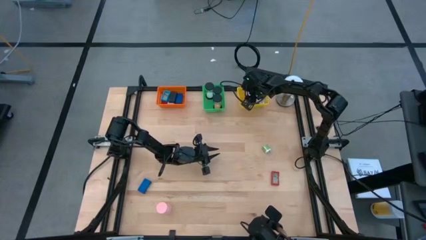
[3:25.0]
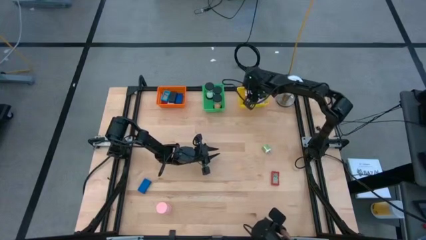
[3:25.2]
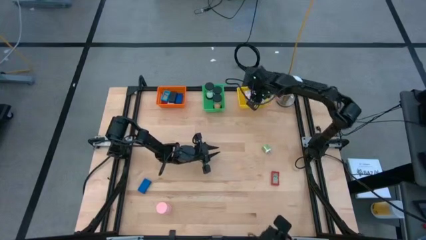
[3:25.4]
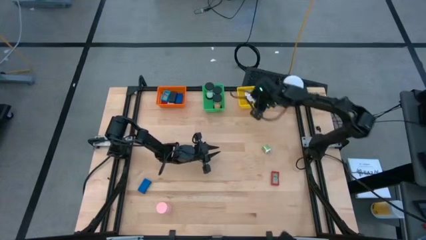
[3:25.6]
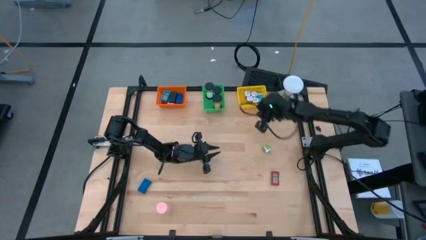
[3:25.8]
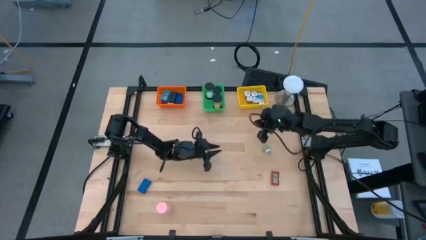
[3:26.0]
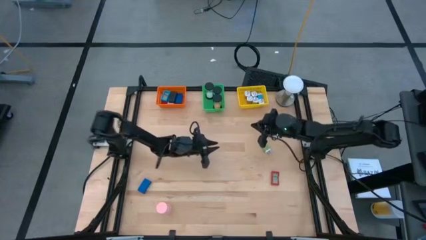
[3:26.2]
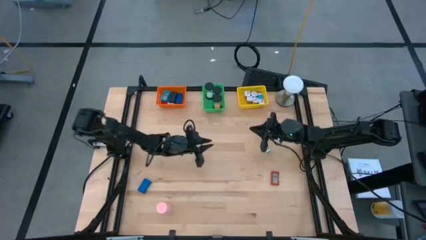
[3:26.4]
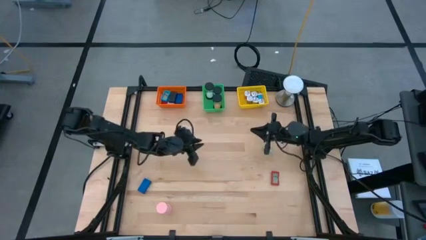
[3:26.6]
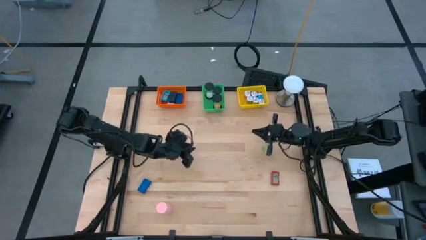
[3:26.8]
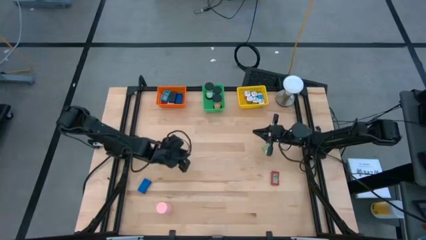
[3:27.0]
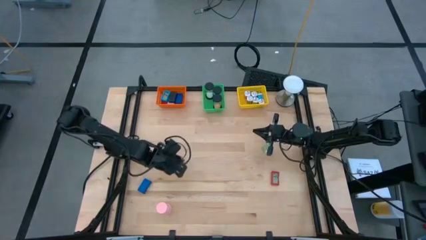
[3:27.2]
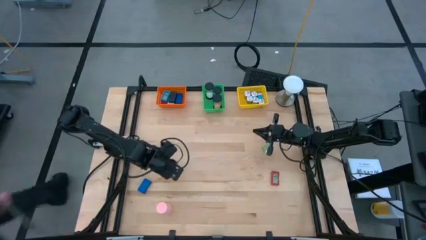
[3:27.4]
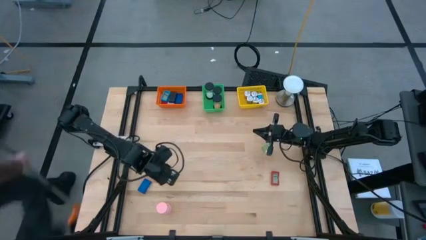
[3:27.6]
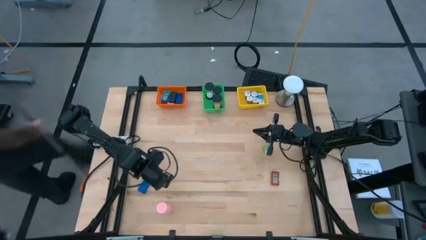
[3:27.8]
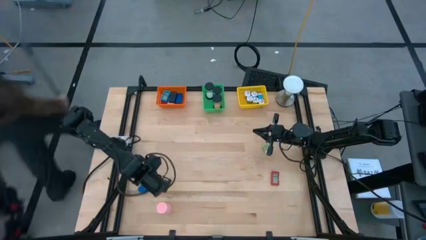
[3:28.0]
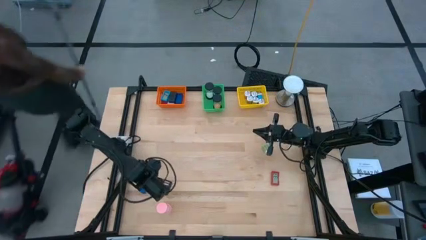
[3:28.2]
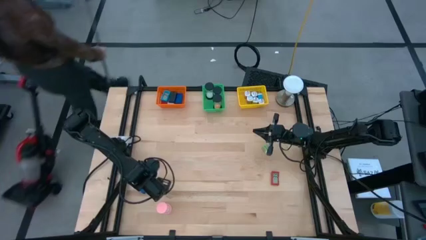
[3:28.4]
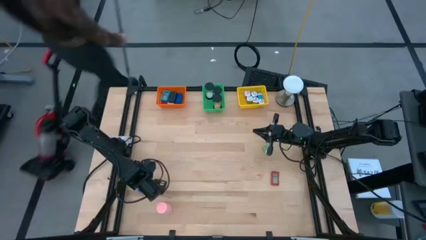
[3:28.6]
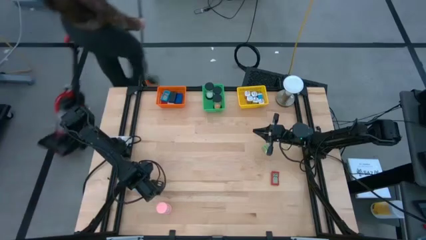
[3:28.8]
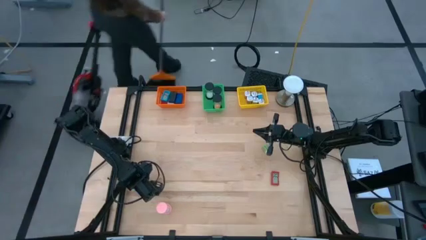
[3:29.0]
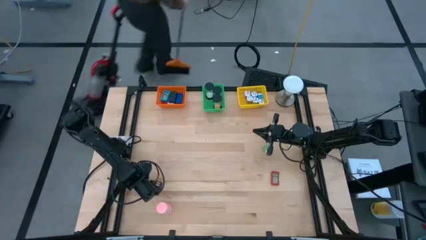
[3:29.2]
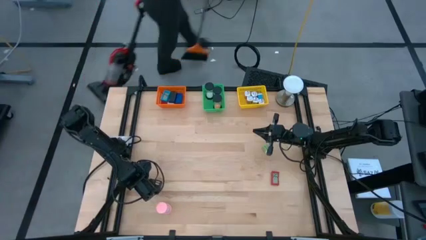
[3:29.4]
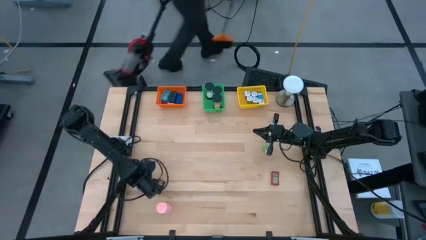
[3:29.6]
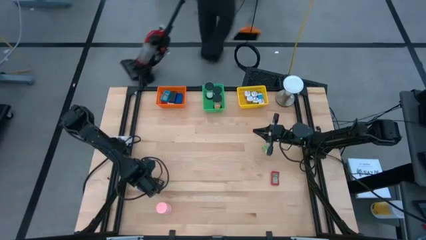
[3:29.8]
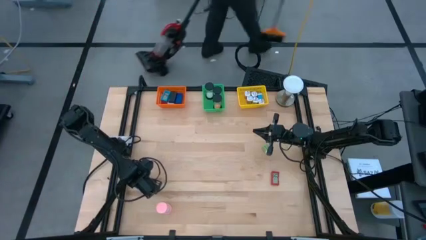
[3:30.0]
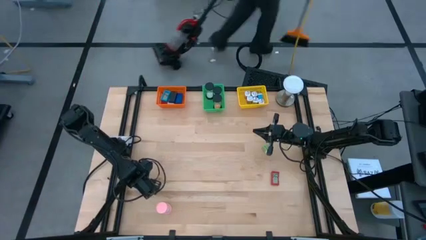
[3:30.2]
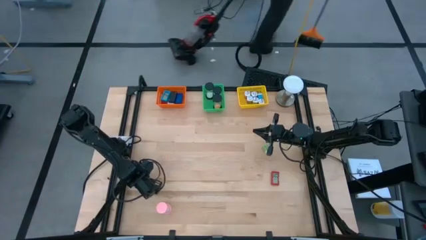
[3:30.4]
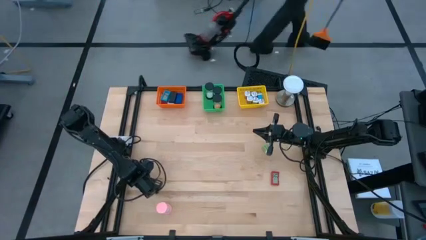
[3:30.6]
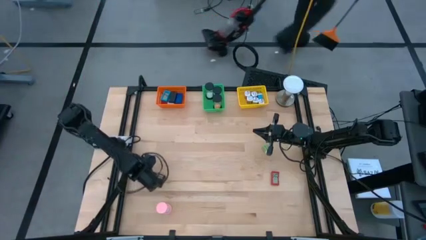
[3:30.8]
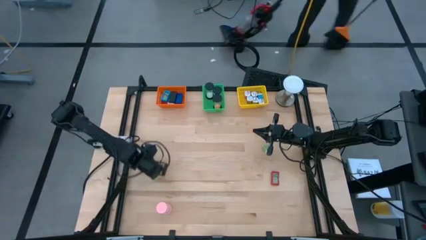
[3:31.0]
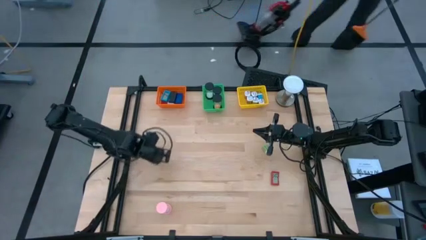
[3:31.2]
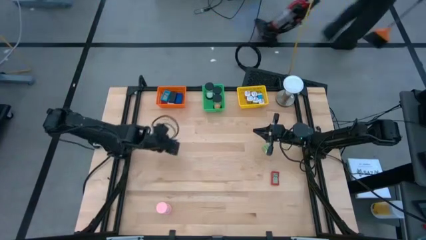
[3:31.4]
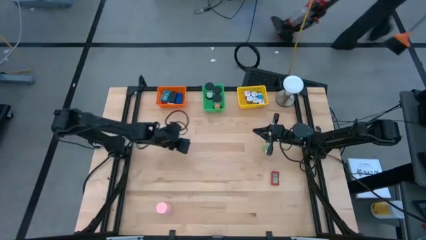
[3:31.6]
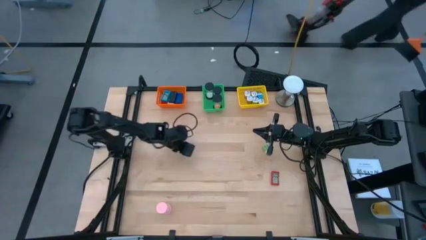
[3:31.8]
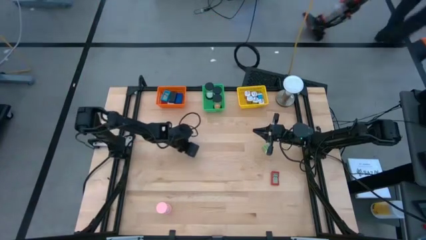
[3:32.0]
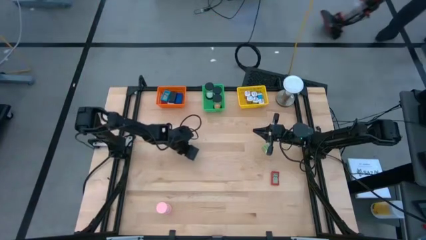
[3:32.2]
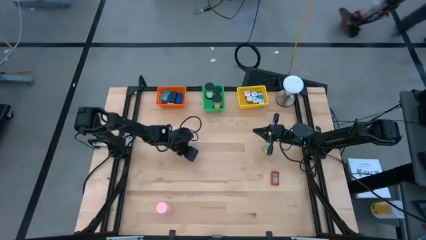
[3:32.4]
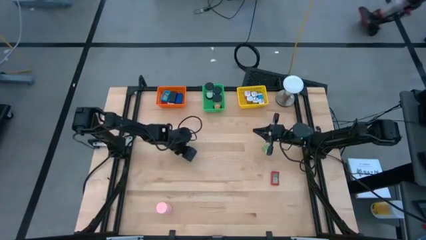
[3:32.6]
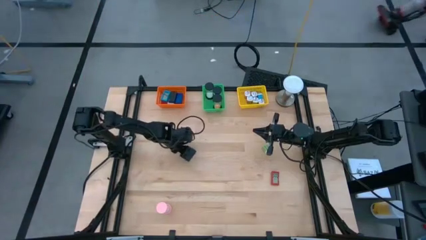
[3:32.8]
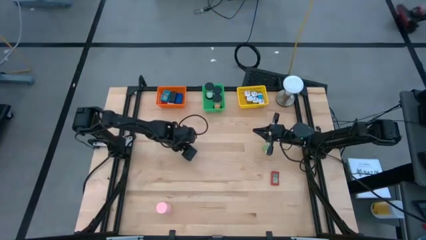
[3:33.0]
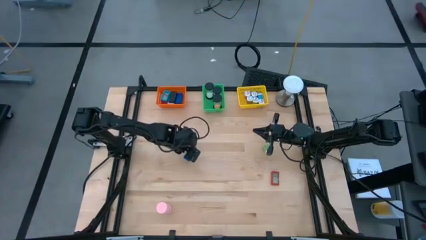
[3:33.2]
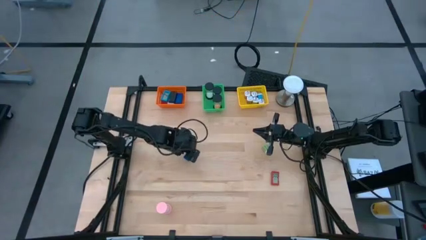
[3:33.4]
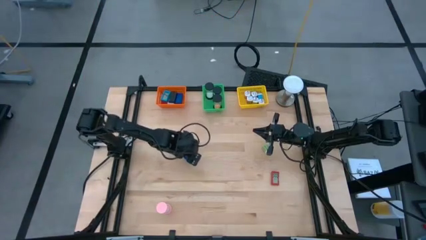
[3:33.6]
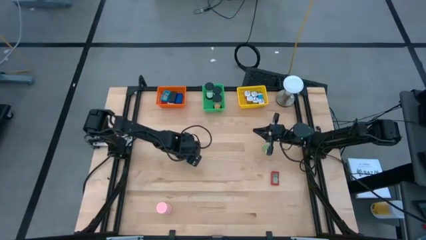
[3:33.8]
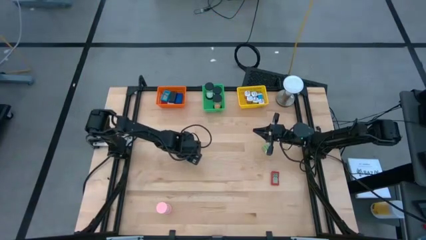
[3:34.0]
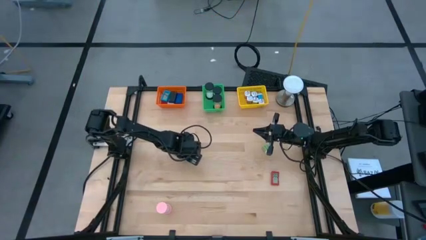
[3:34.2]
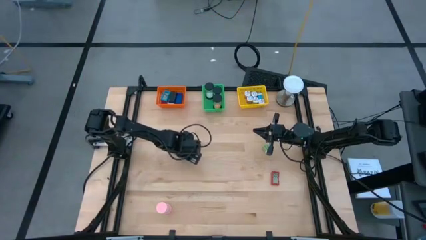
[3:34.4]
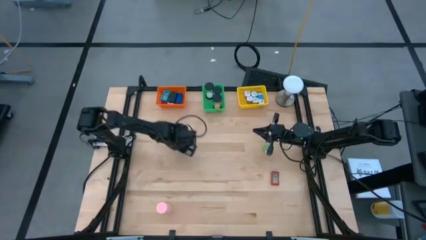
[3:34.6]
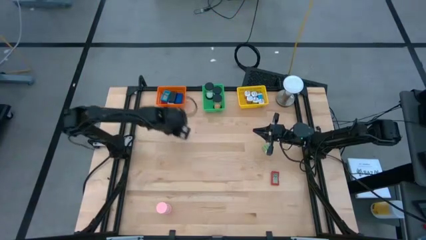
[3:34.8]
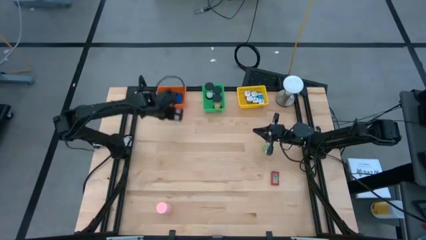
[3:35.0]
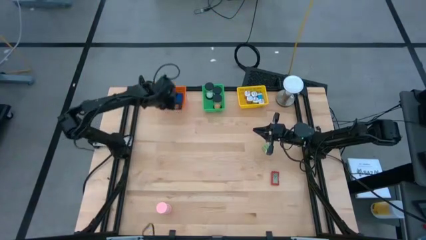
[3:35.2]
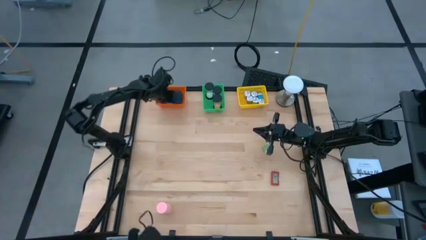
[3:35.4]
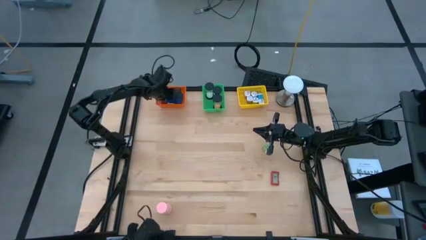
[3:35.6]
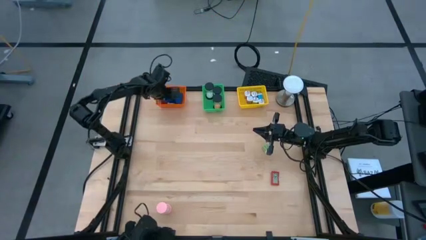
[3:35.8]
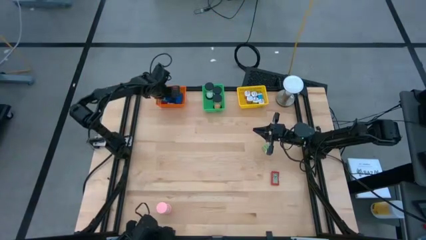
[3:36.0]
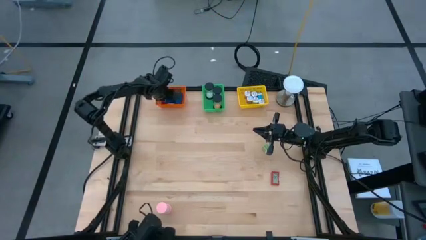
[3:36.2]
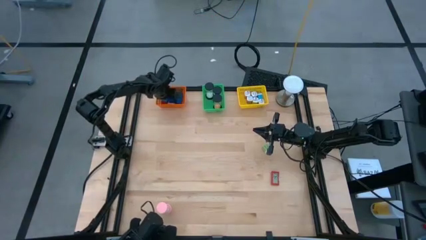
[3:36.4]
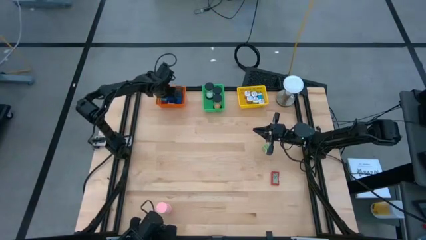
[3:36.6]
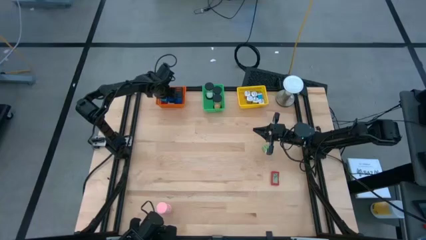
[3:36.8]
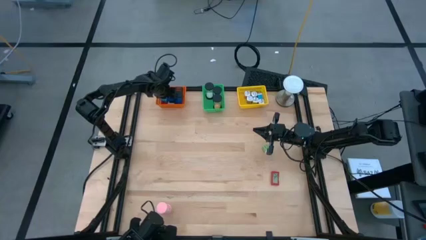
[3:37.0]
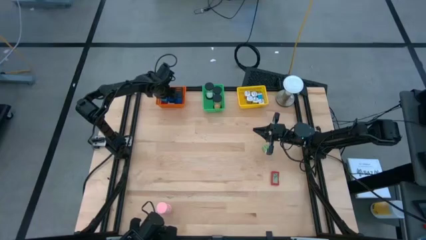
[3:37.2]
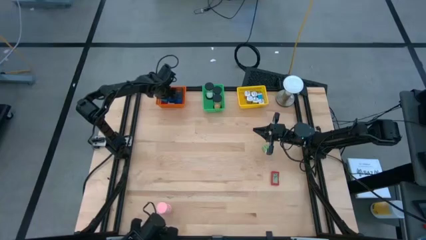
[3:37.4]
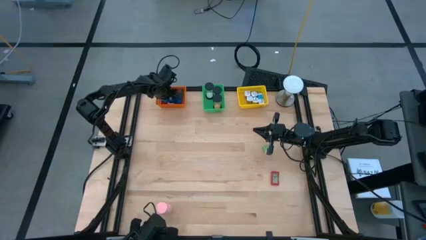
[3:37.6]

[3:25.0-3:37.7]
Task: Pick & Place Office items
Put the blue digital clock into the orange bin
